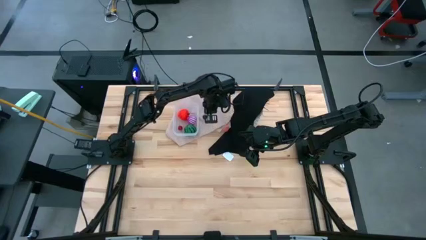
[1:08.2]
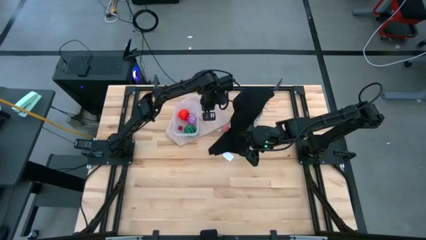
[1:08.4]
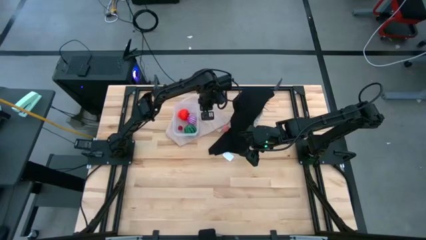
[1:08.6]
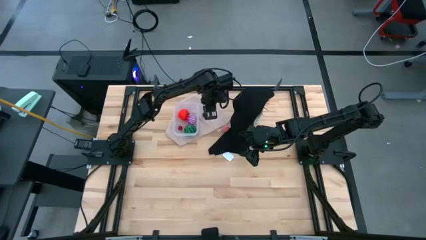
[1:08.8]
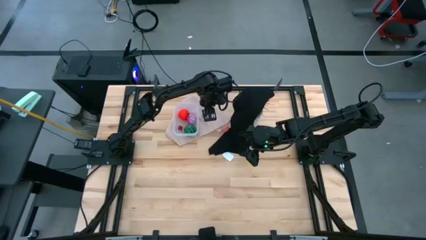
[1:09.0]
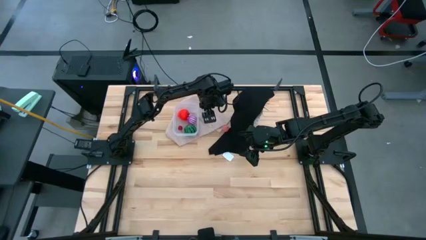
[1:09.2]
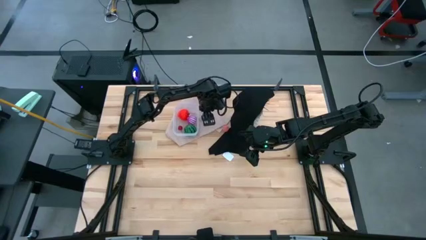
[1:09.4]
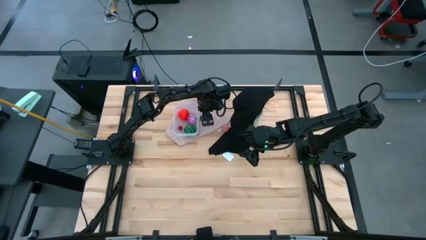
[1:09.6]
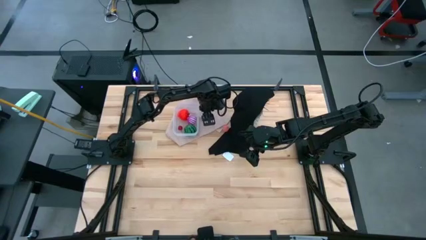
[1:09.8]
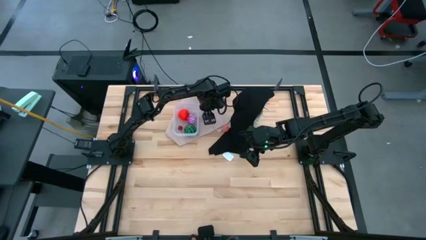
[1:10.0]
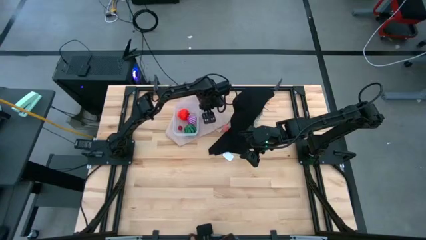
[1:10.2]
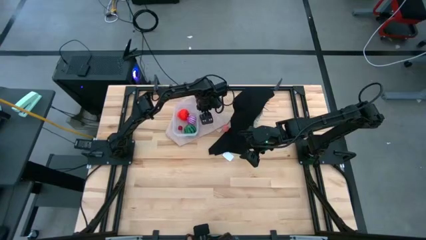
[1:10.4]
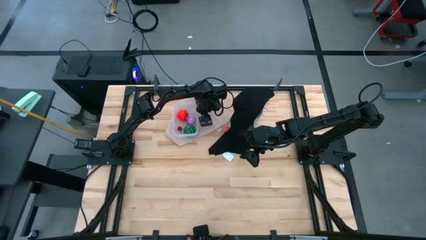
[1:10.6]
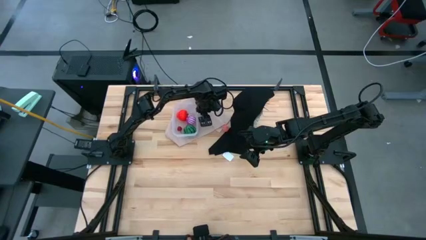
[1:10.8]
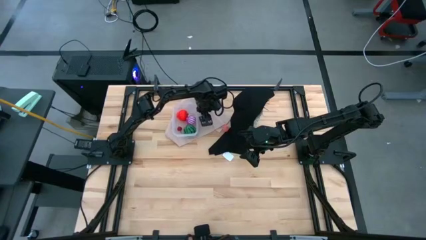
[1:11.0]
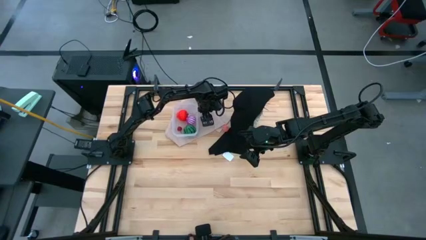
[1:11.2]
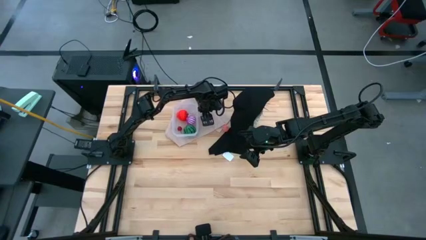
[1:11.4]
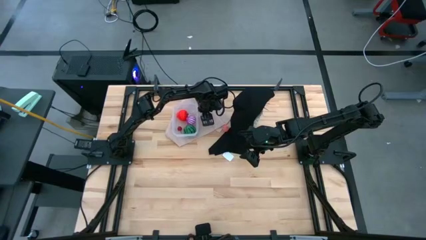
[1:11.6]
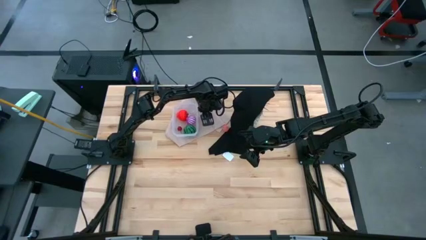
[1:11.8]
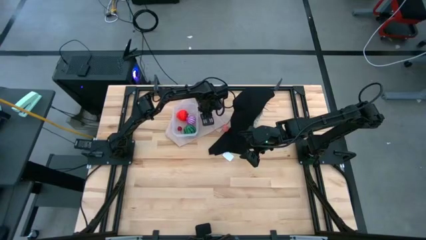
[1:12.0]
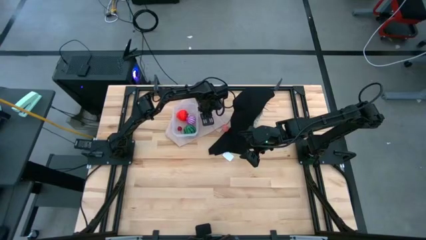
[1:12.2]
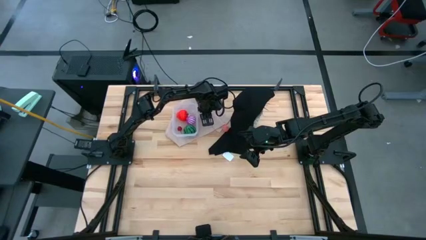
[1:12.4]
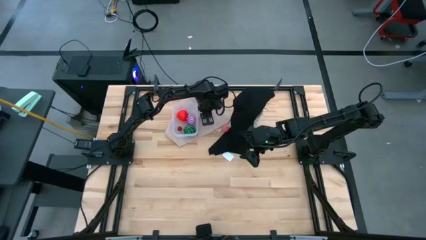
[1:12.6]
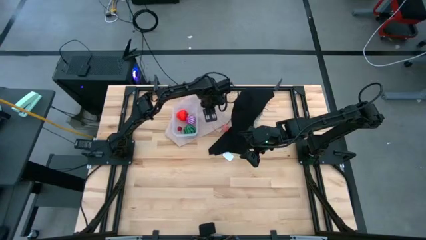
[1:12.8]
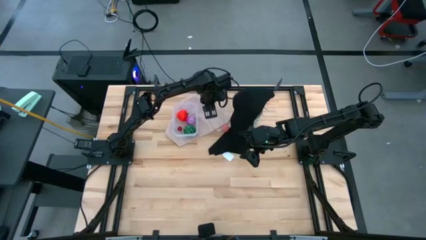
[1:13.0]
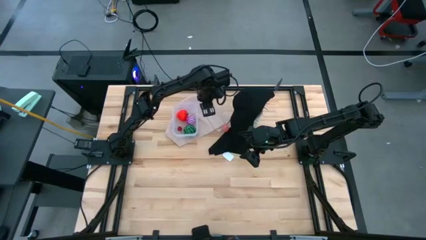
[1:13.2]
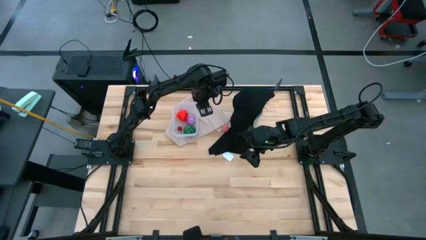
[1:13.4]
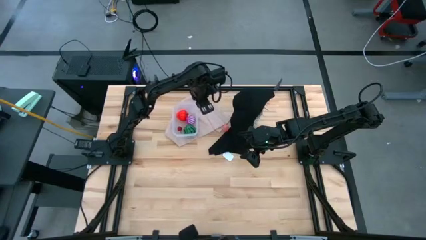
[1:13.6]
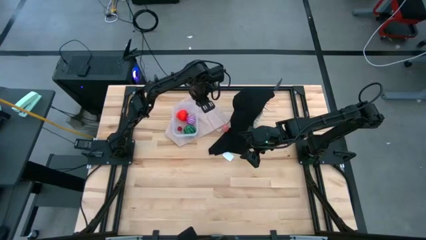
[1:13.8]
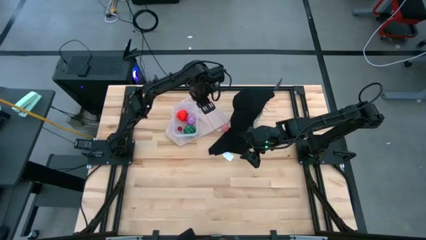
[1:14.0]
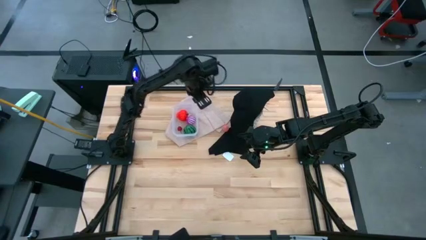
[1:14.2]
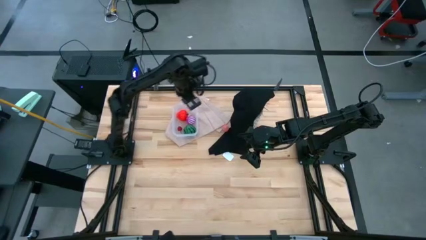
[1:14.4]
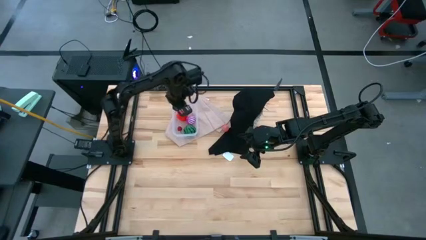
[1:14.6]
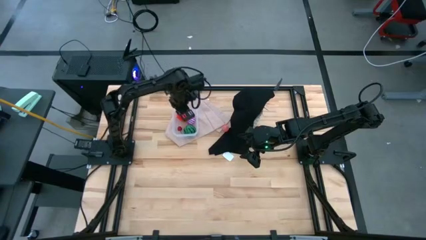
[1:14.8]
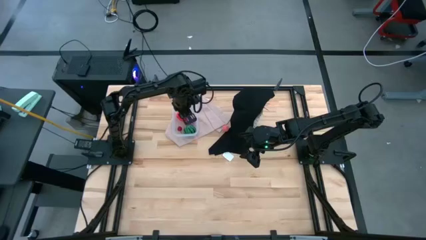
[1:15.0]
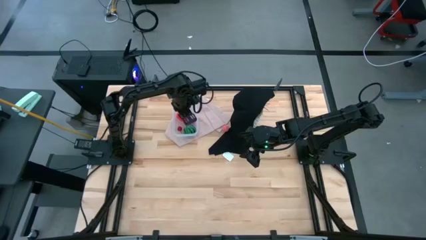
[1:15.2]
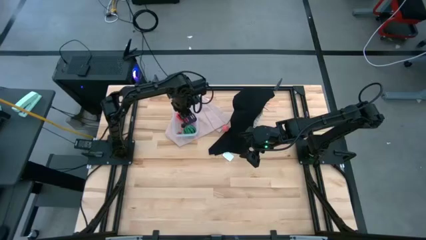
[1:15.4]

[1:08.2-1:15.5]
Task: Pick and placing Produce into tupperware
Put the black cherry into the transparent bin

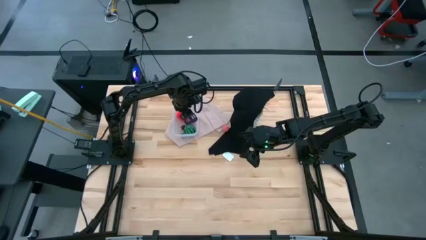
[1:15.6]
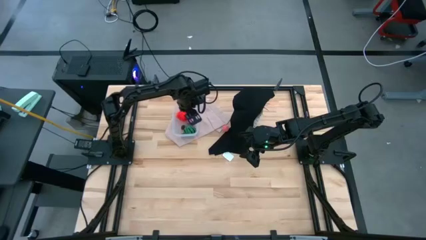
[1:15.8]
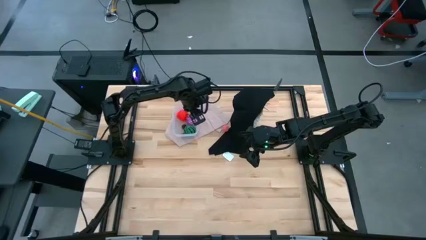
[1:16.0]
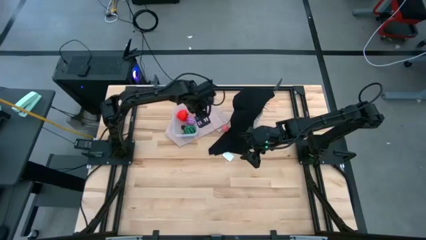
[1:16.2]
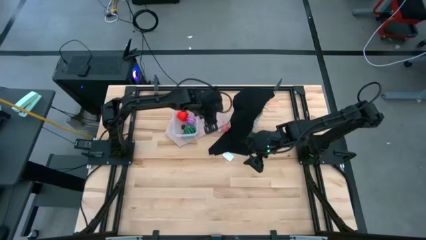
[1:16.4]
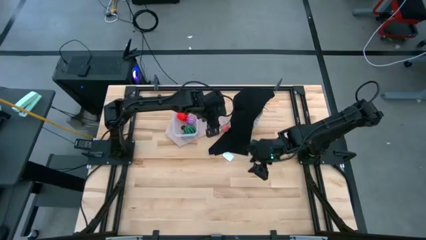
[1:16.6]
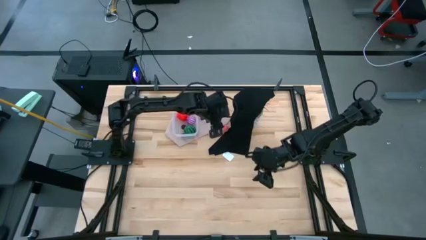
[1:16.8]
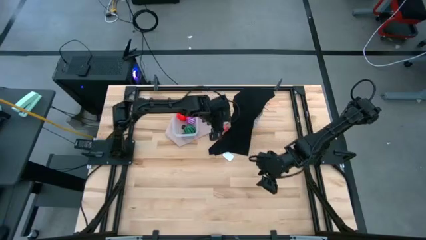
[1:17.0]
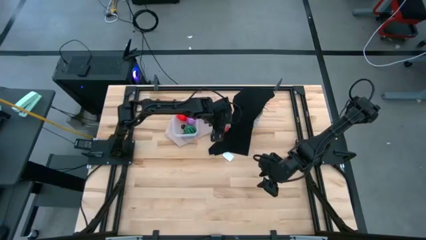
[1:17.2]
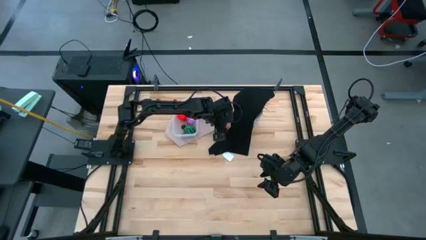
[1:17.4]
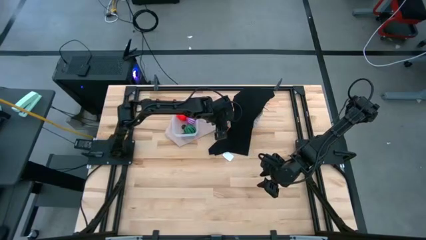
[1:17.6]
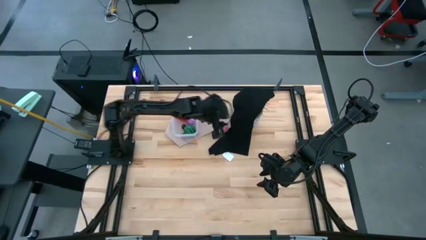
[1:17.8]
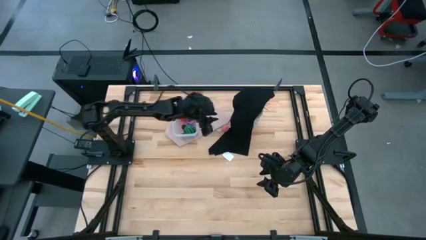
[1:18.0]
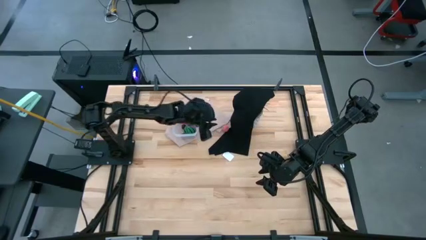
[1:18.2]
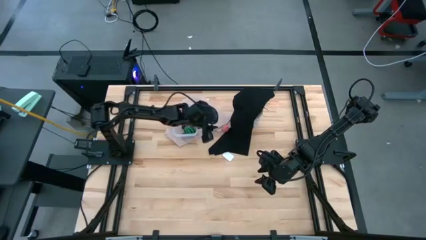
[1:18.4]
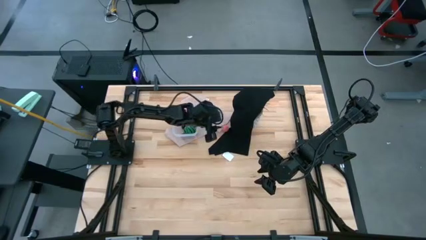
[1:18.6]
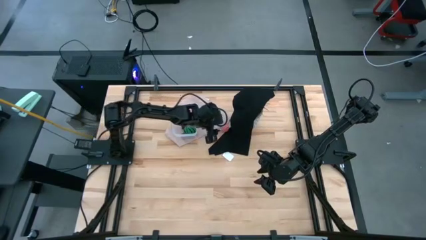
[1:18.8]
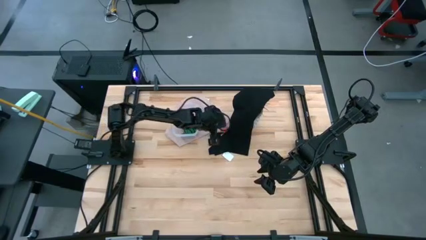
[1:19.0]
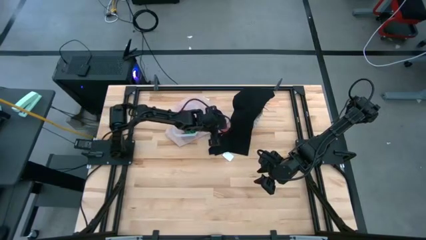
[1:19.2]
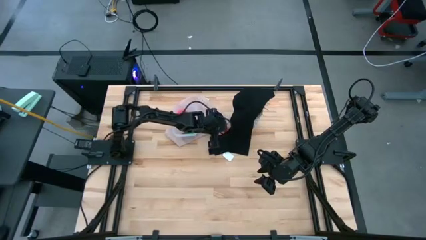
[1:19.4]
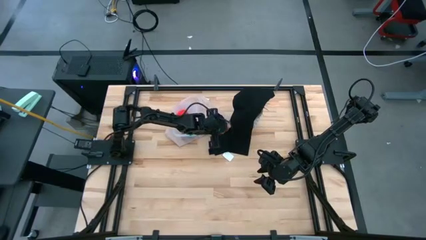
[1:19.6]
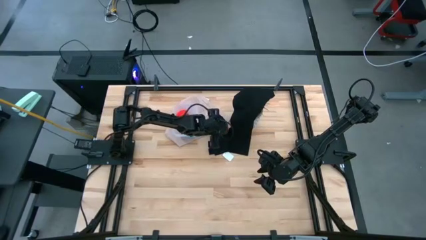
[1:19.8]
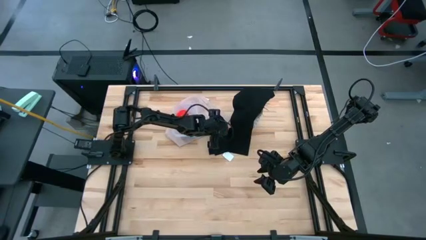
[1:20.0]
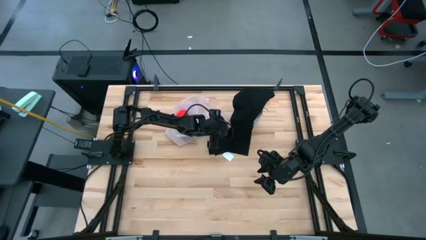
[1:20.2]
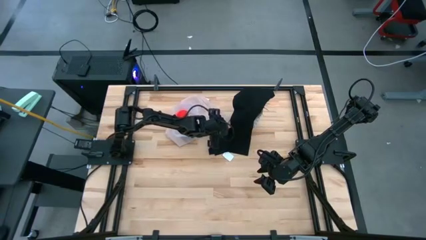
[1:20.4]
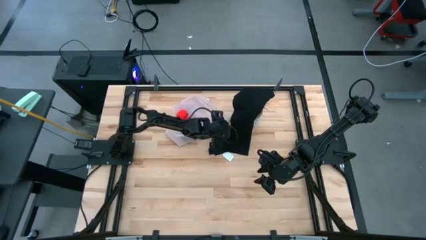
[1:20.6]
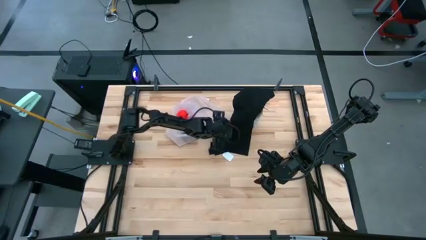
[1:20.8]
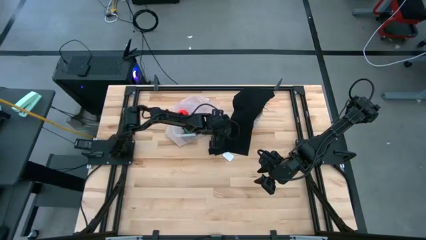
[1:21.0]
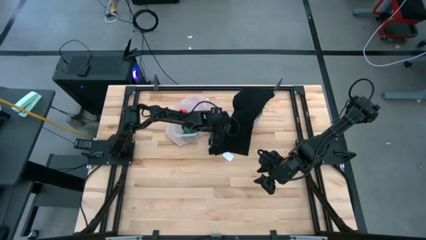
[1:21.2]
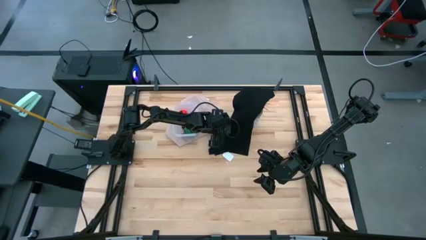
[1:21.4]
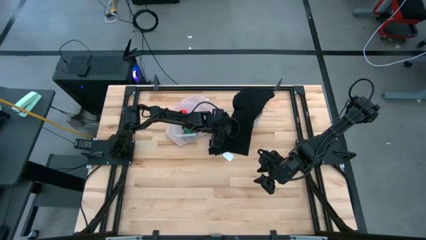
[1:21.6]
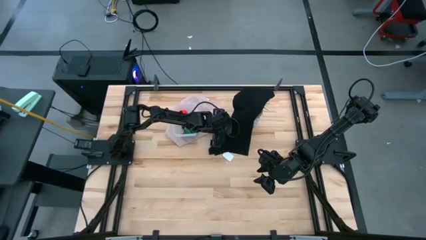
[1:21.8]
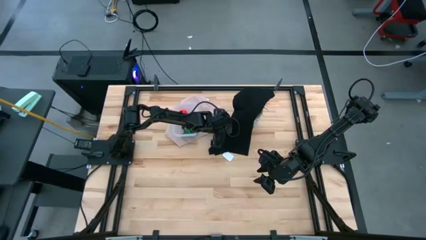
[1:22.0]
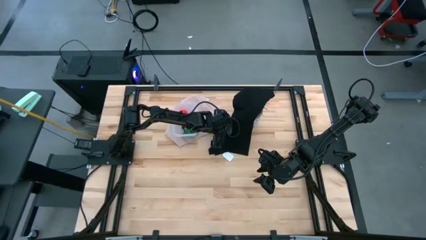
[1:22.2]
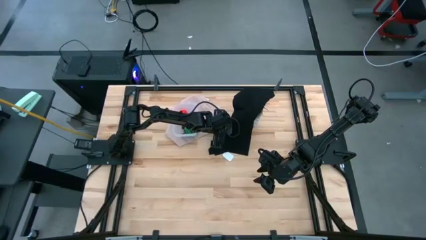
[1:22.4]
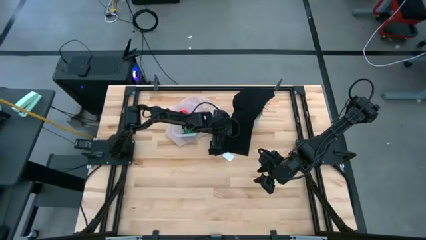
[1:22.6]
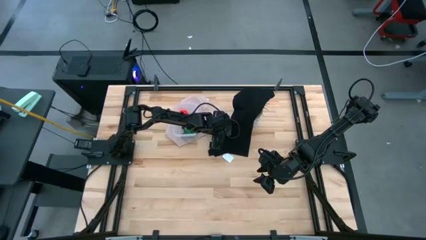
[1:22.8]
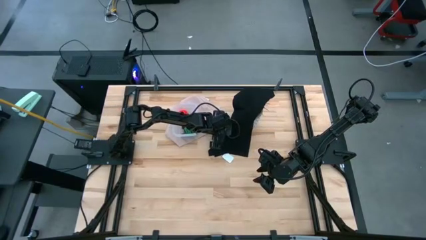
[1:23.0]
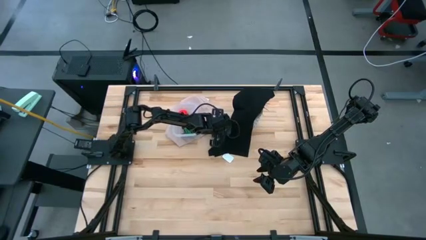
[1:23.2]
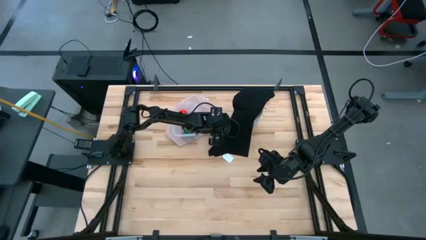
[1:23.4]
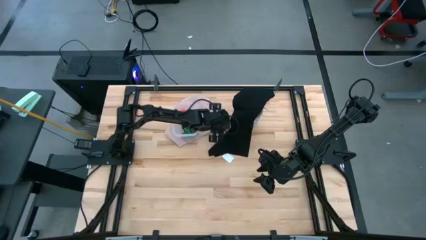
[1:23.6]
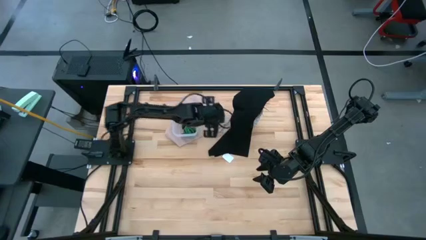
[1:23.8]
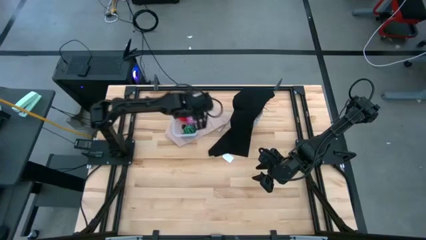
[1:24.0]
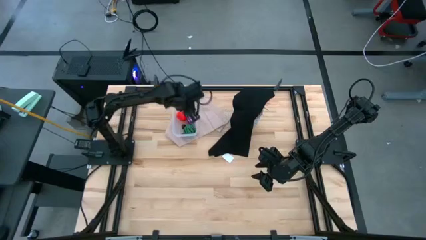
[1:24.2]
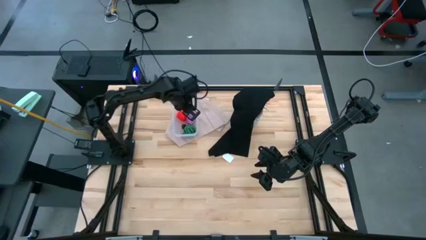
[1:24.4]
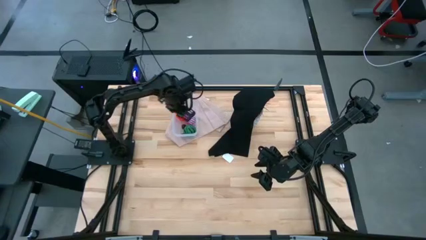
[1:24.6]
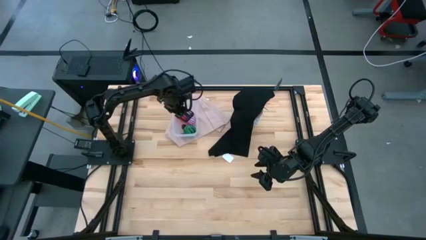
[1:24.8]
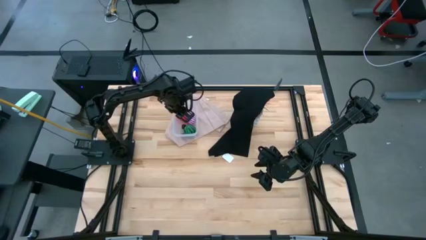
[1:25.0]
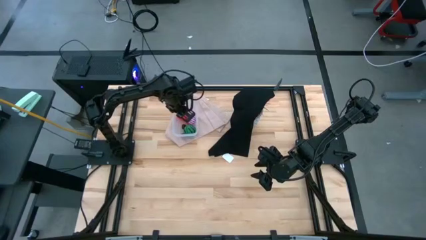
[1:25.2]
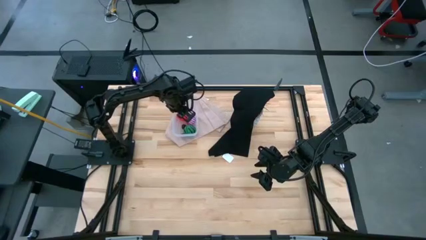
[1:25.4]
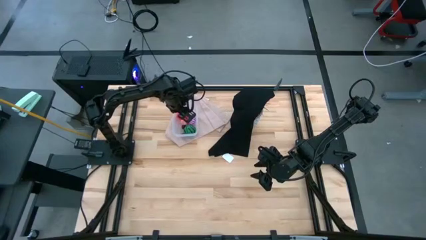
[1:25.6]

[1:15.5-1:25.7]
Put the pink peach into the transparent bin
